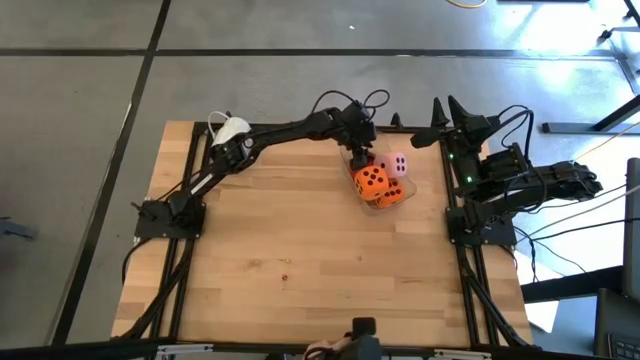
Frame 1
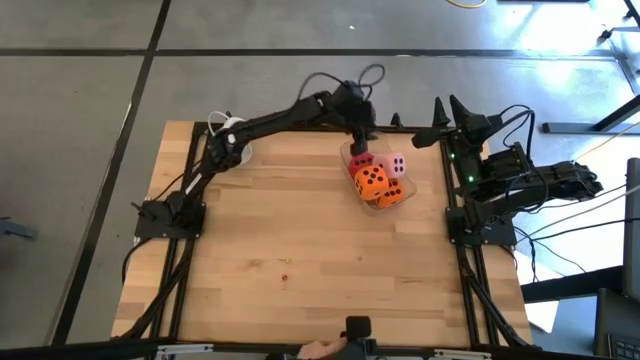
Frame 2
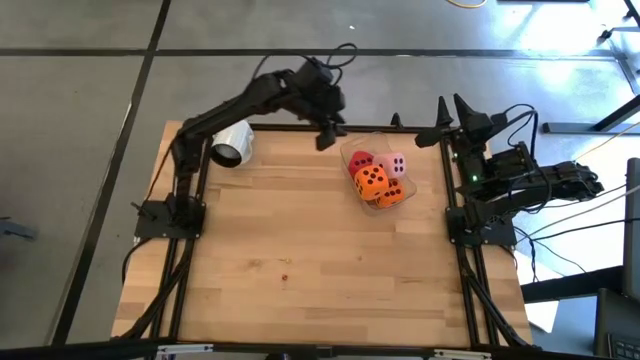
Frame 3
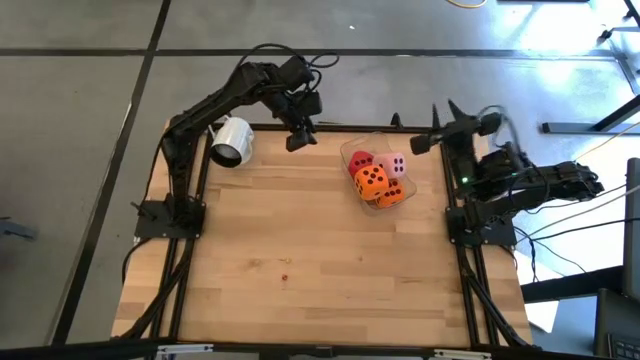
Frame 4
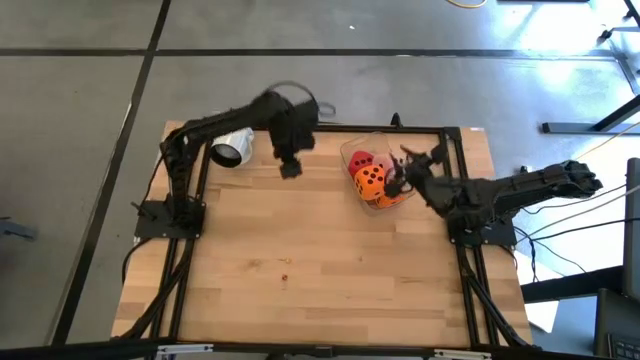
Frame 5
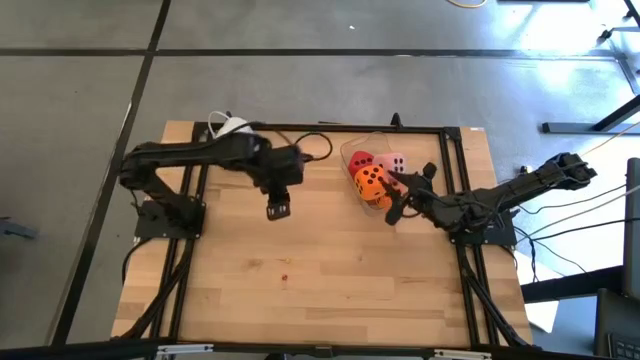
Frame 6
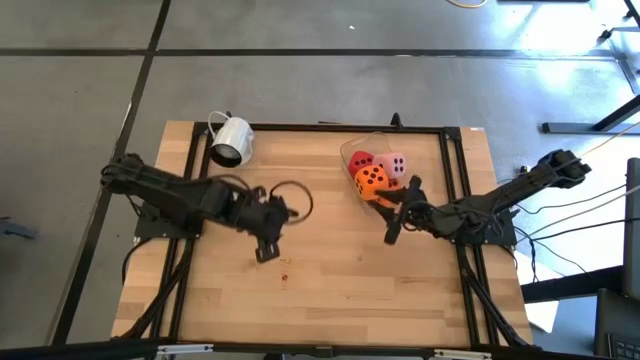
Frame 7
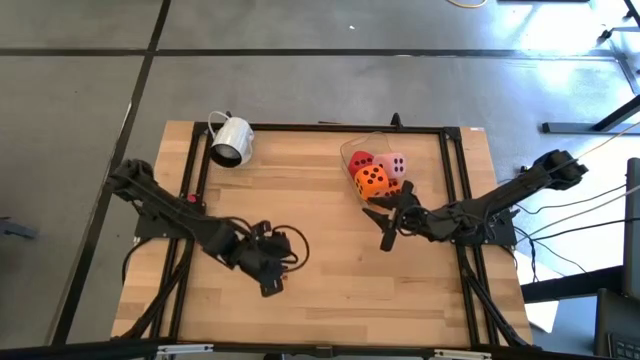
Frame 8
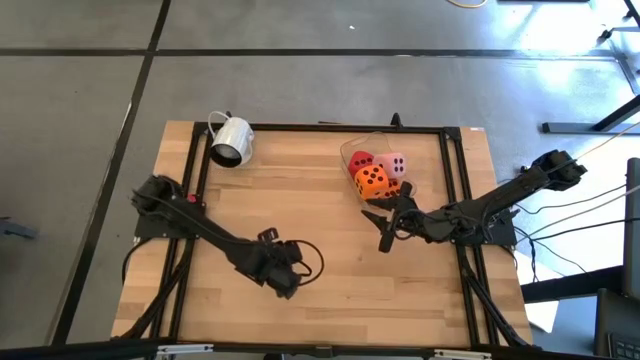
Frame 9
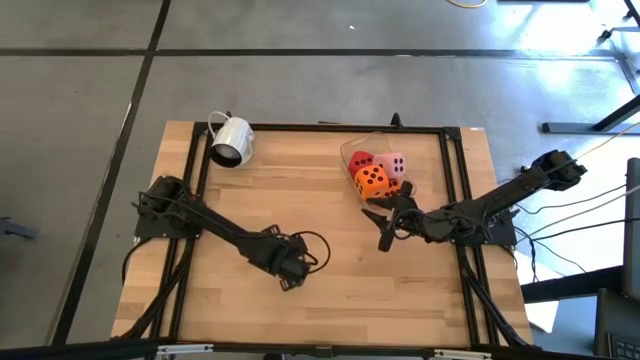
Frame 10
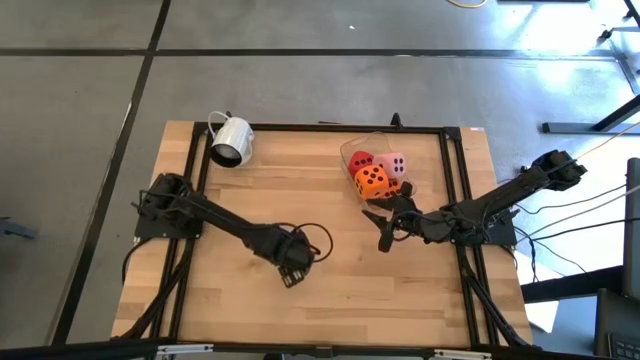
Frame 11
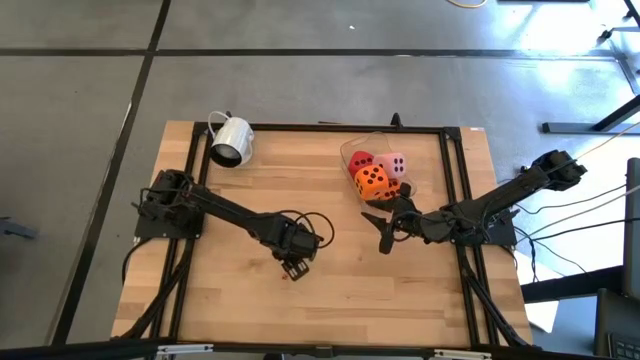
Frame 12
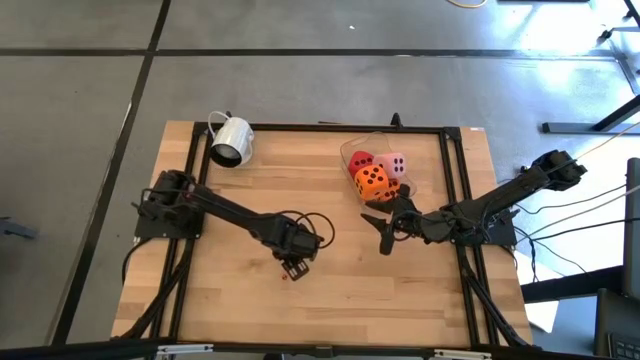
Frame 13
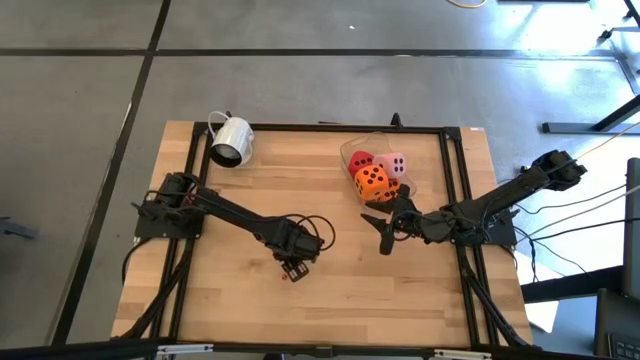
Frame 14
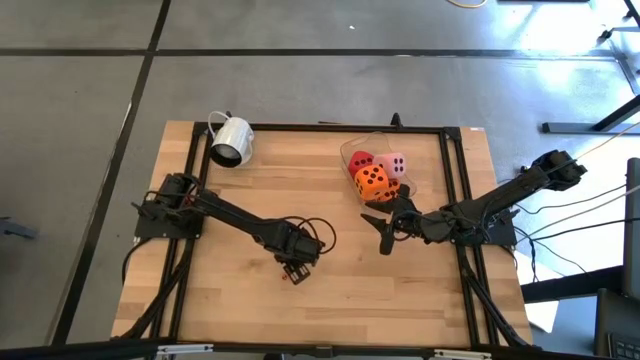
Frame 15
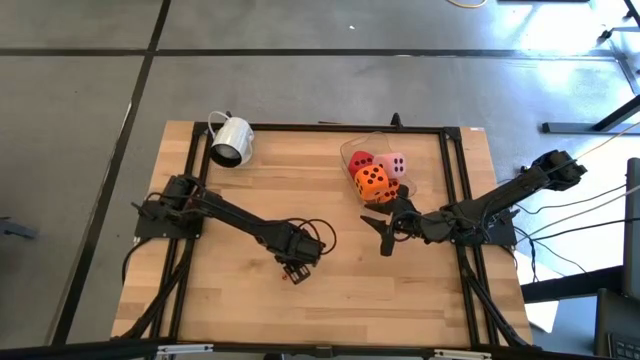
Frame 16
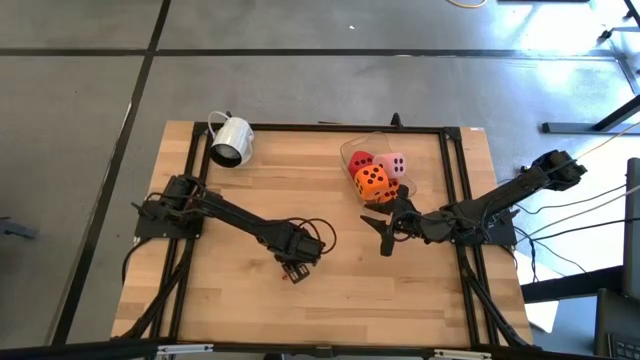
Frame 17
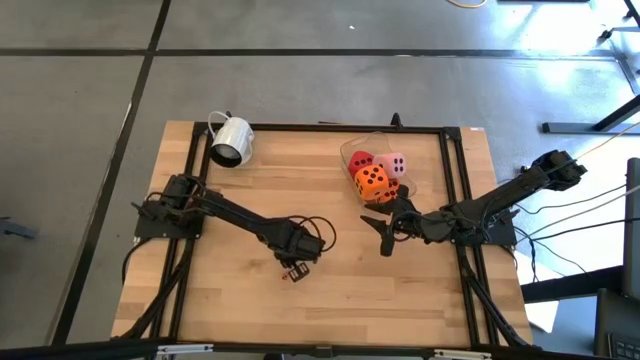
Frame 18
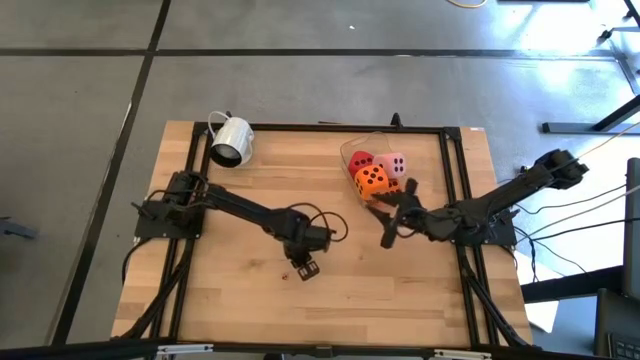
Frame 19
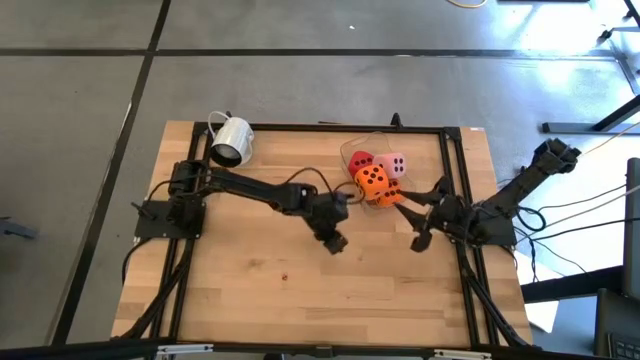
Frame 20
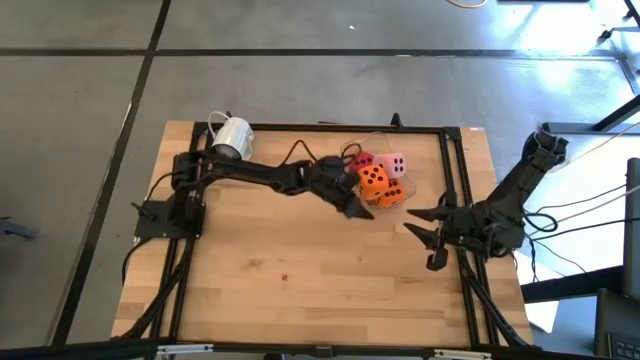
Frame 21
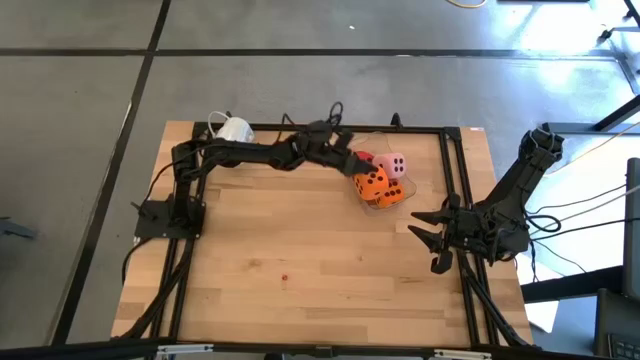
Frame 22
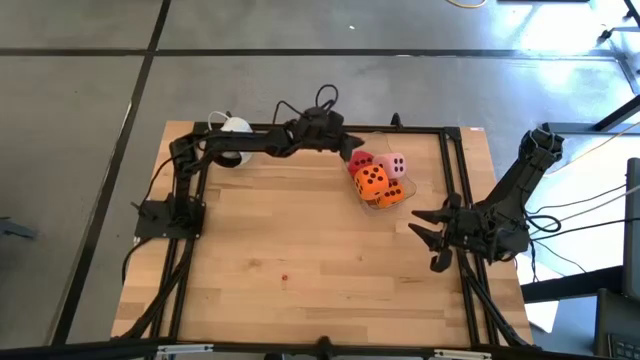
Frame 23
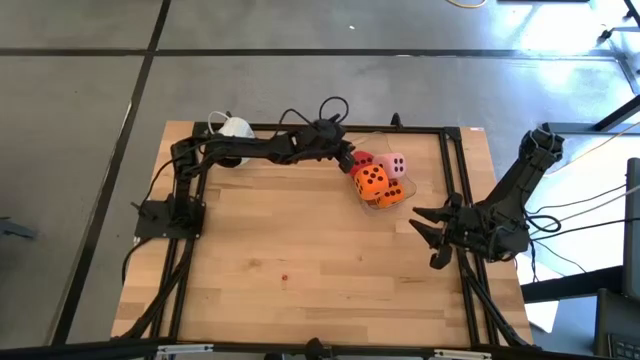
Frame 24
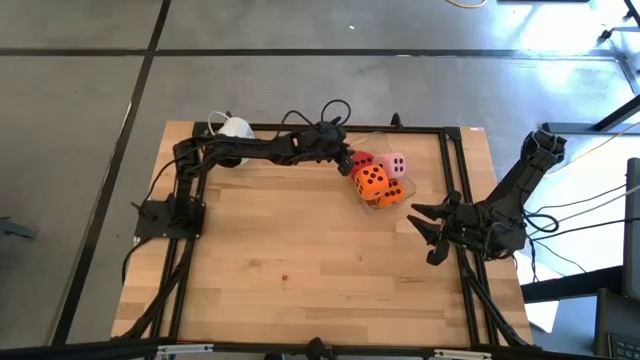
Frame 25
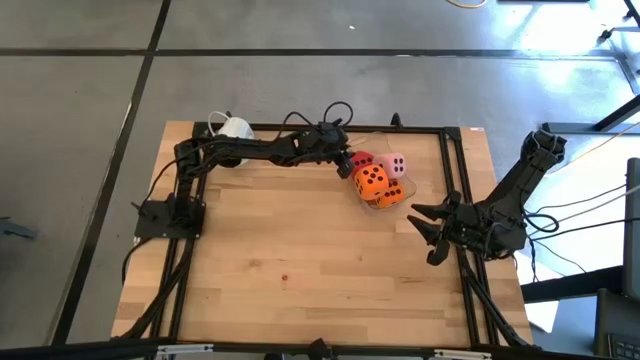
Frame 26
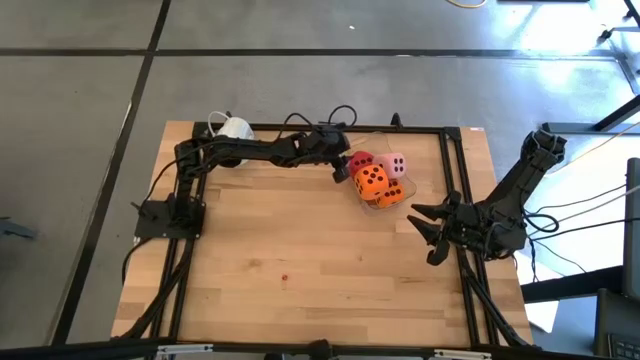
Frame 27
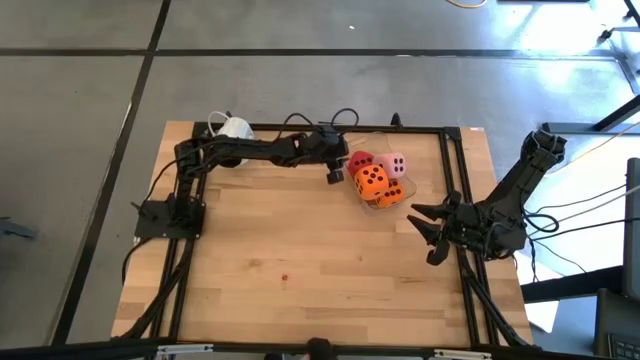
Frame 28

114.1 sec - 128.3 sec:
Task: Pick & Place Dice
Put the small yellow die in the bin

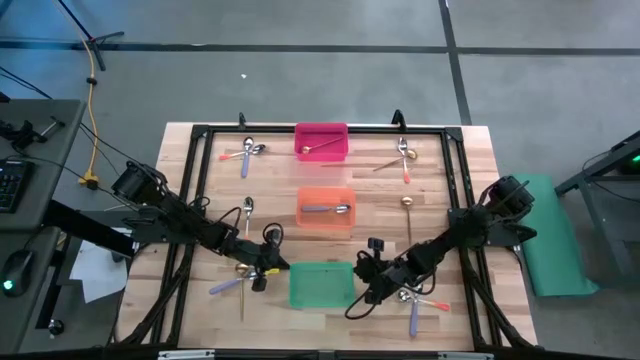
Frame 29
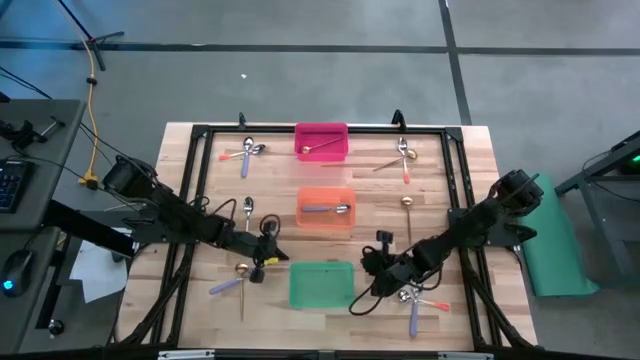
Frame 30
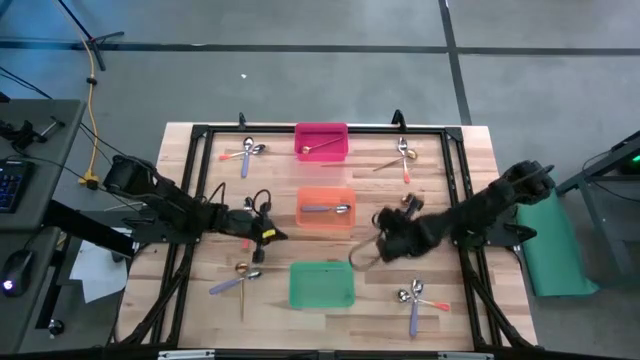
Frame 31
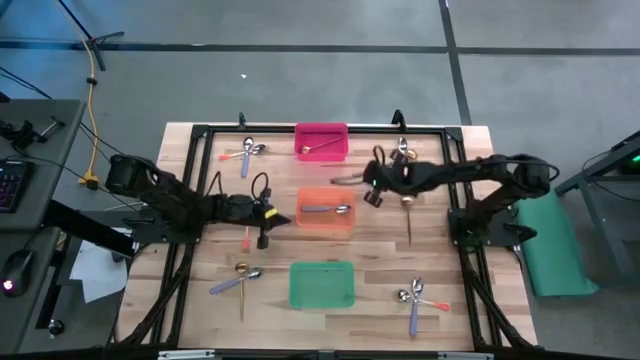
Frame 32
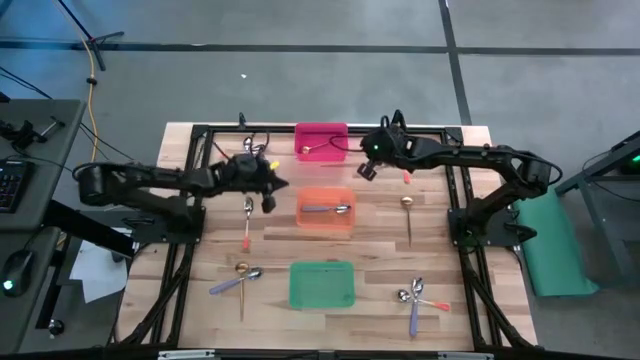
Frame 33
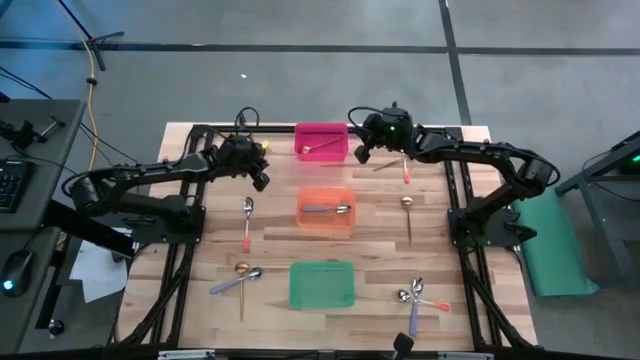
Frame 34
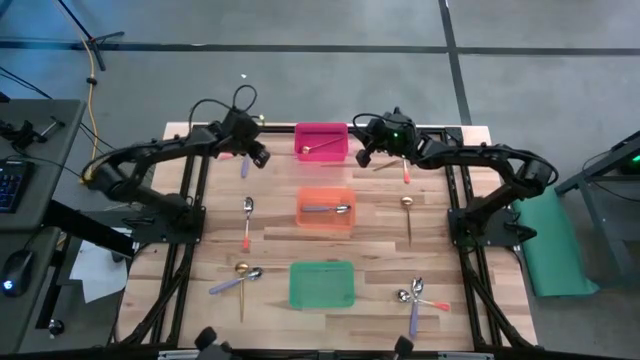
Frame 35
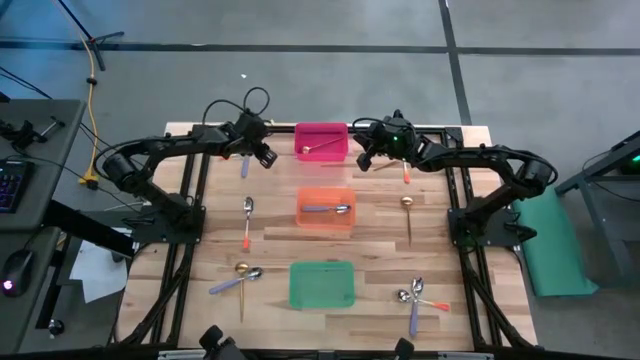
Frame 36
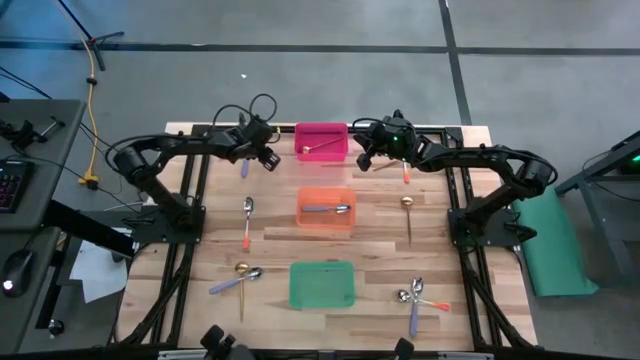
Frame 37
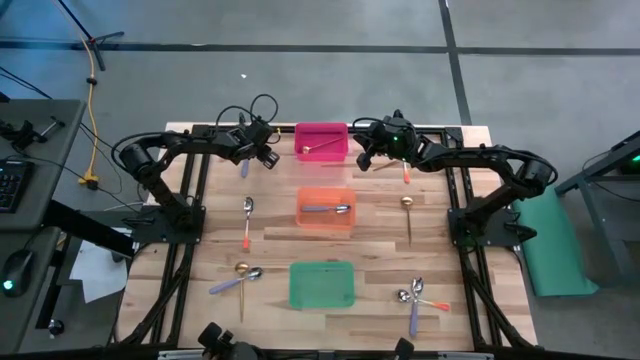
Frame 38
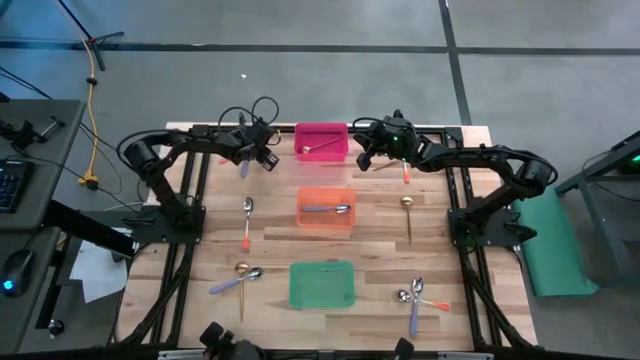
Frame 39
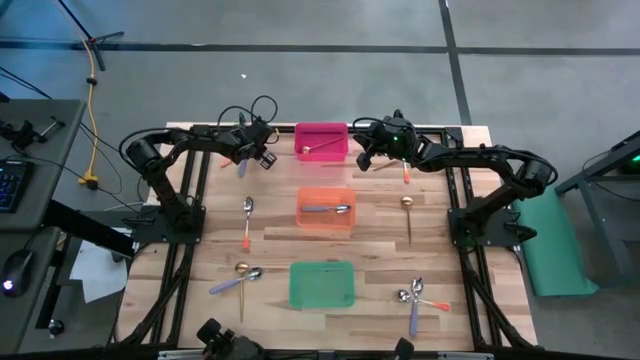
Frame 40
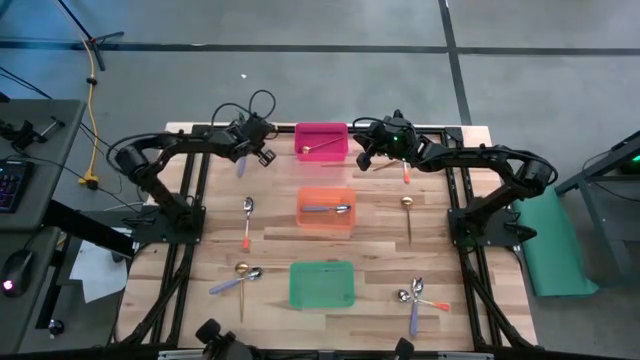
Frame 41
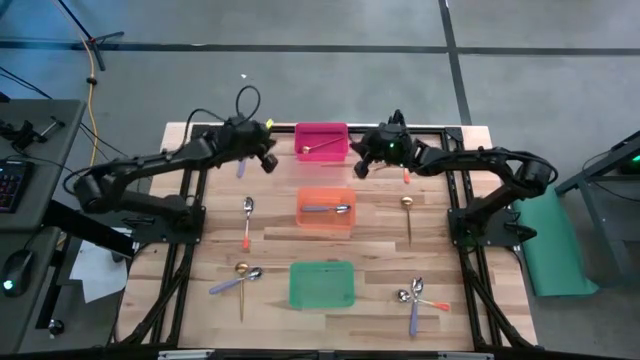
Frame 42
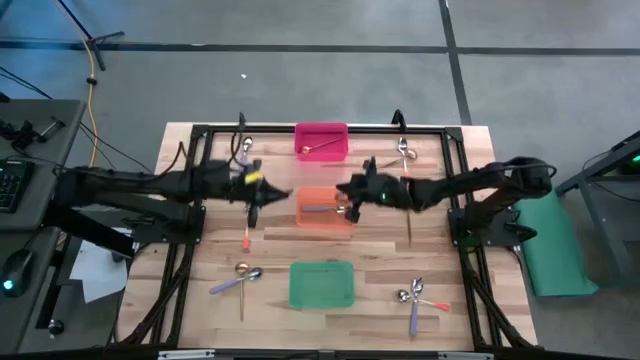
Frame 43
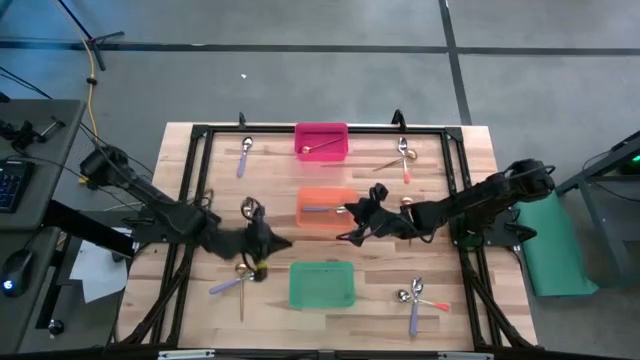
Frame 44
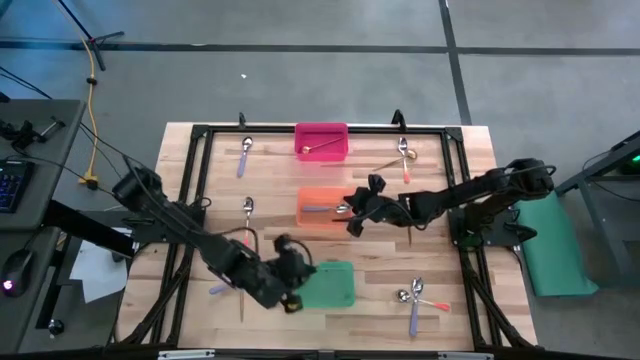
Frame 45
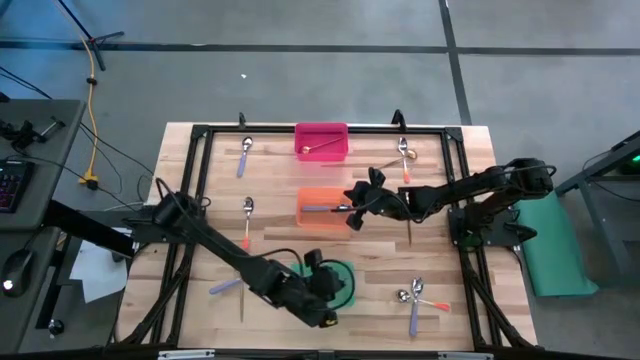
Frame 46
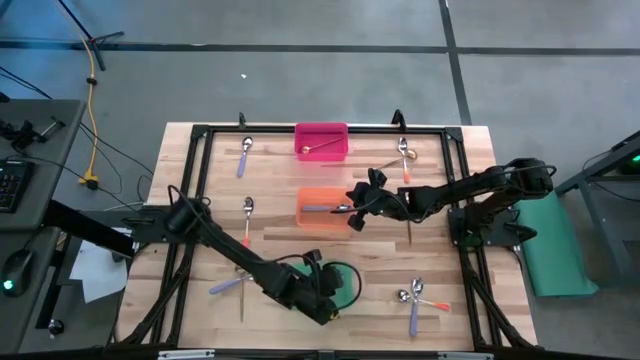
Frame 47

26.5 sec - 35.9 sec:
Task: Sort silverware by color (type)
Put the top left orange spoon into the green bin
